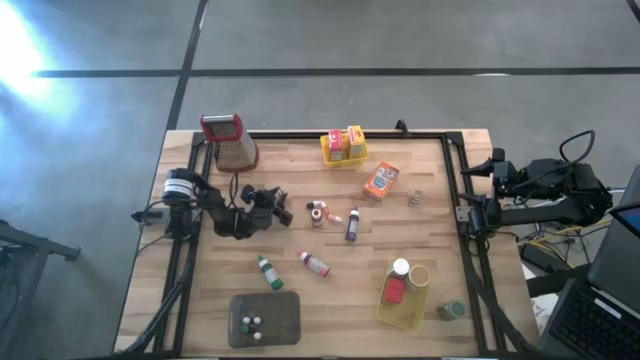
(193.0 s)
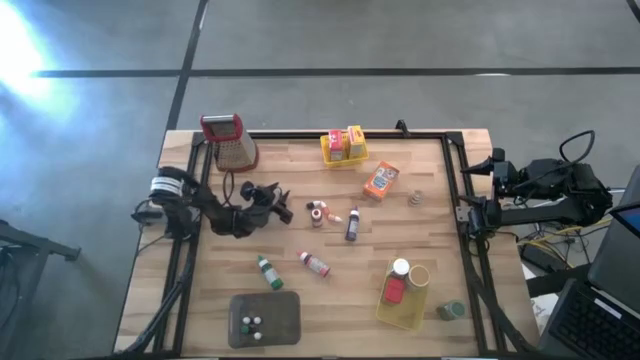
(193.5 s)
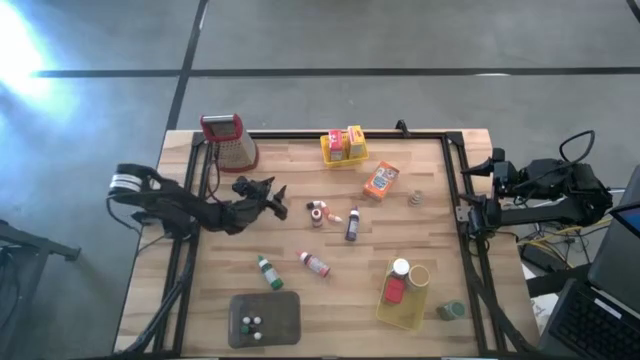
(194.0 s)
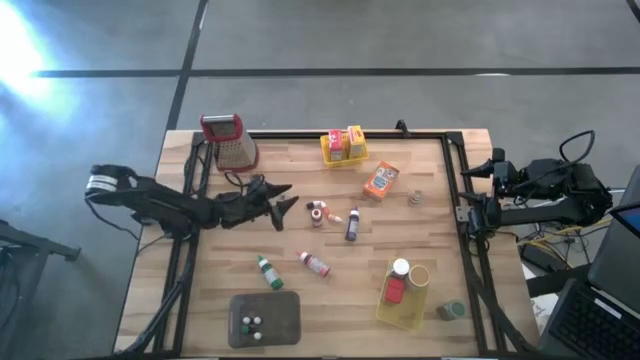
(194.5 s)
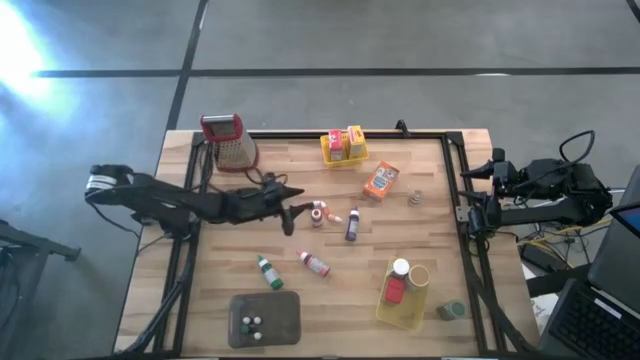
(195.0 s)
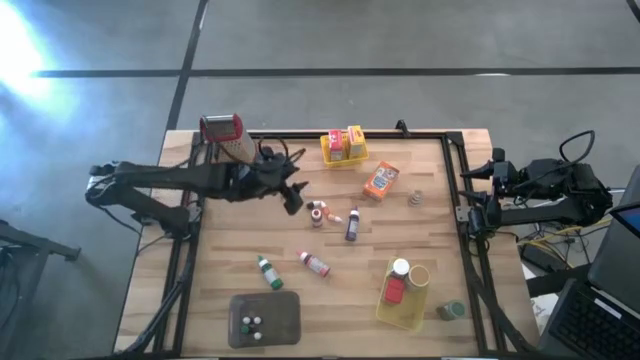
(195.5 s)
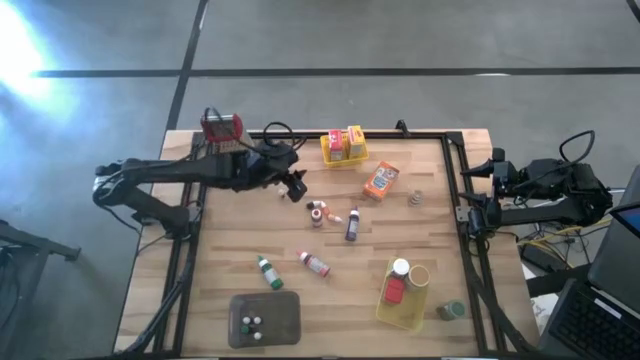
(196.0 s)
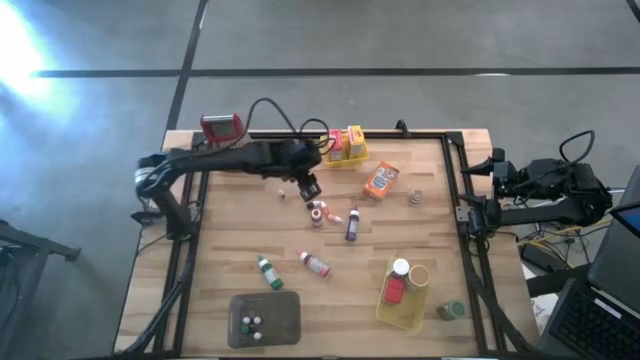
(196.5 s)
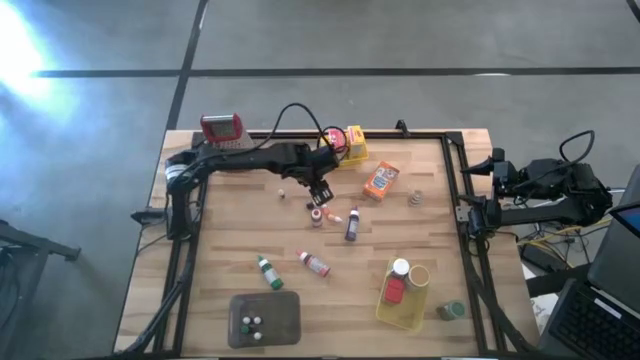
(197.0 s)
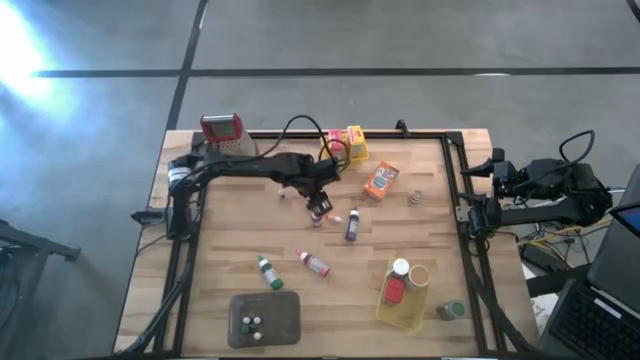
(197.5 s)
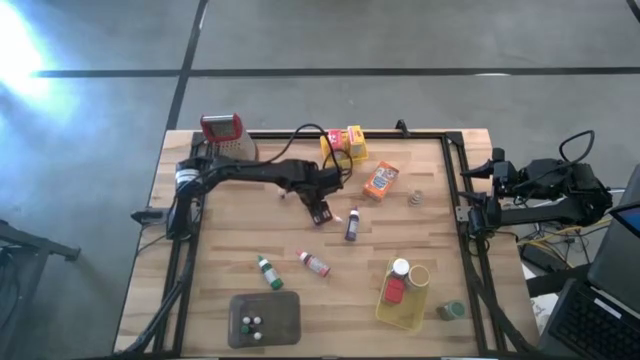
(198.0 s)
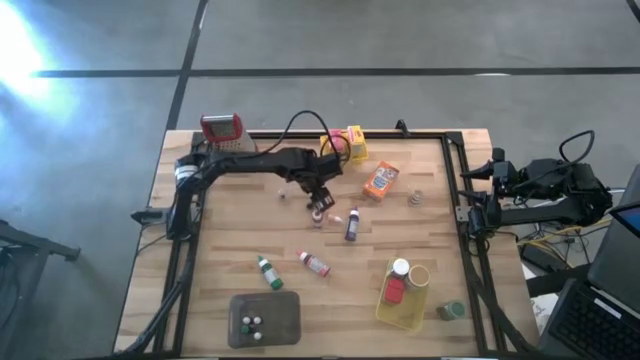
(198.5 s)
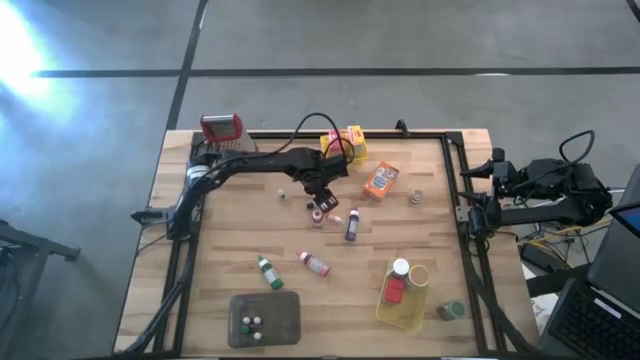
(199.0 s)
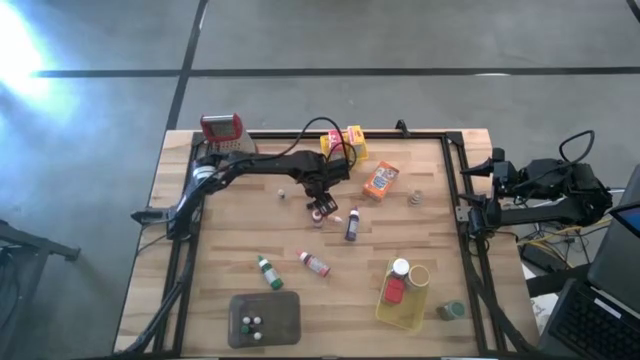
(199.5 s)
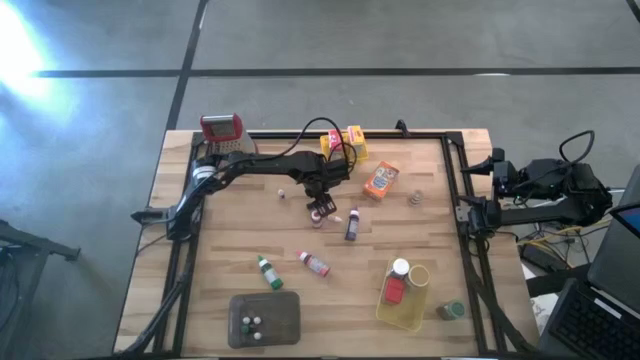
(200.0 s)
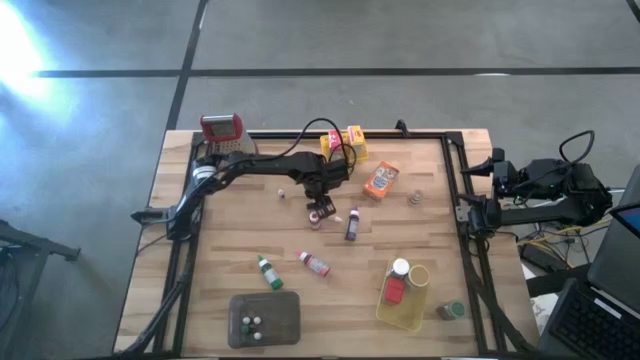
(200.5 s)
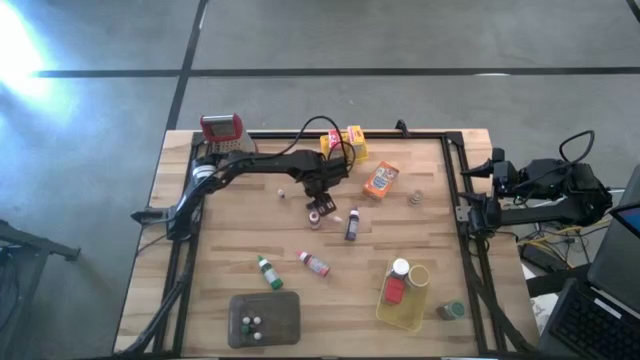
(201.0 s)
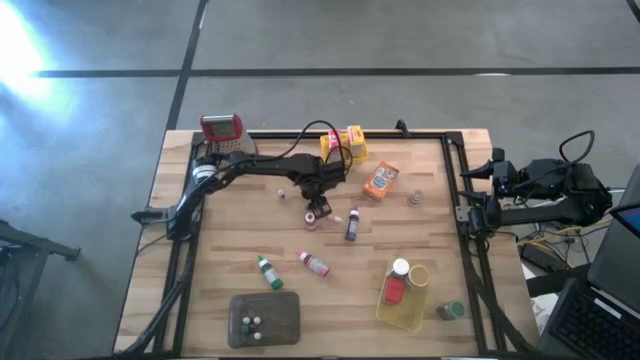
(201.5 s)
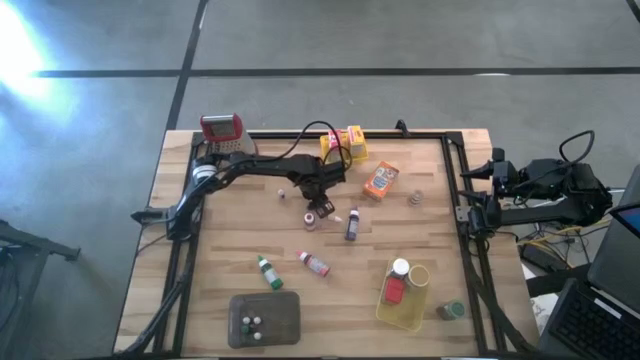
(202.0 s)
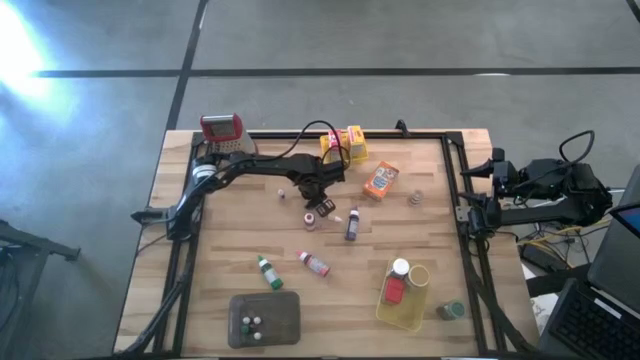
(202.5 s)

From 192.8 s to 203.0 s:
Task: Pick & Place Kitchen Items
Put the black food coloring into the black bin

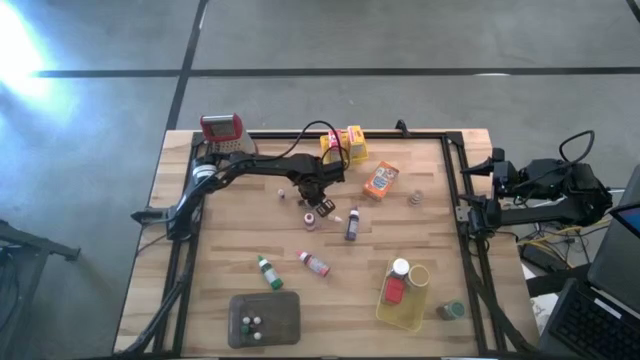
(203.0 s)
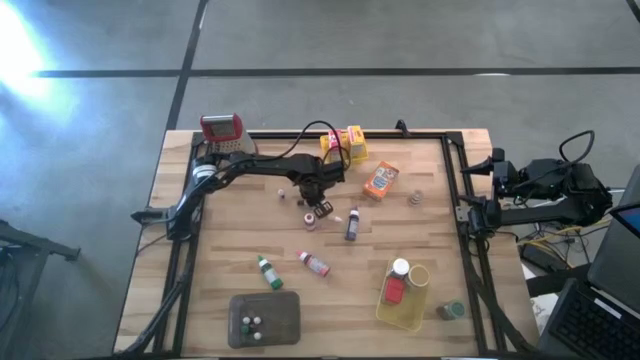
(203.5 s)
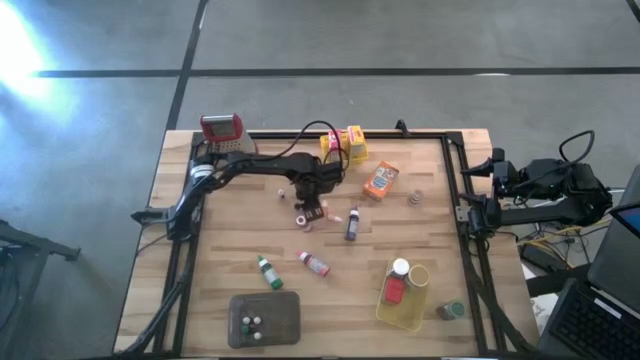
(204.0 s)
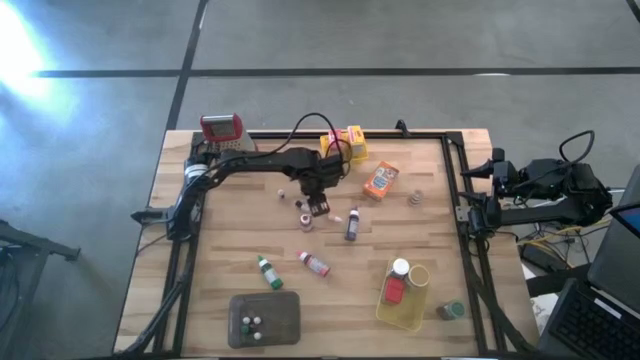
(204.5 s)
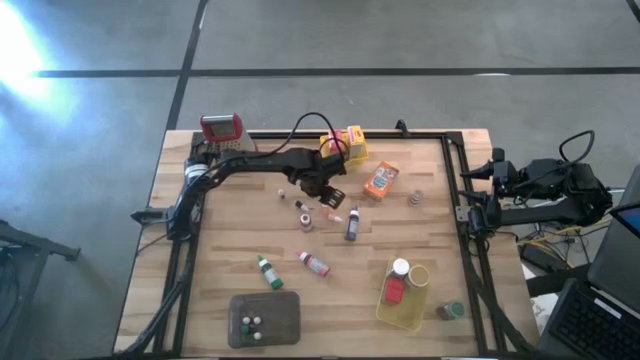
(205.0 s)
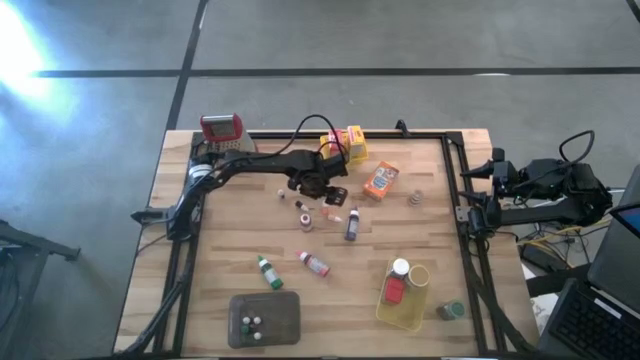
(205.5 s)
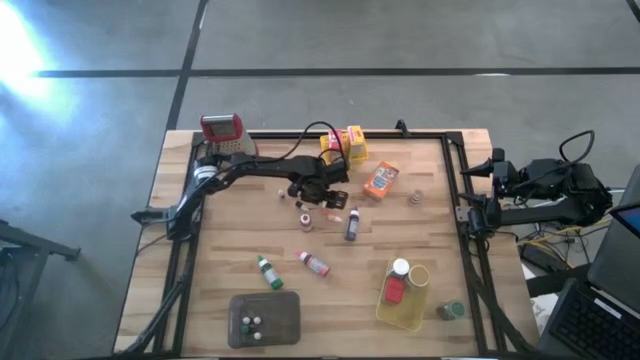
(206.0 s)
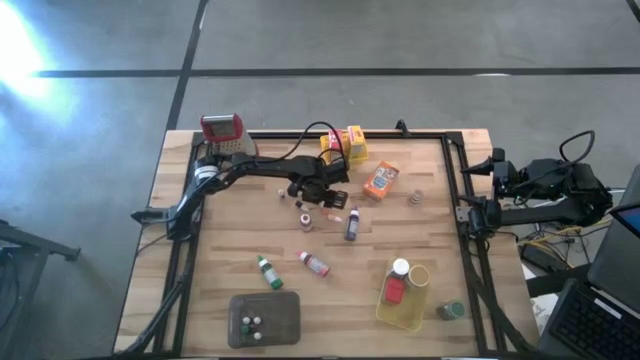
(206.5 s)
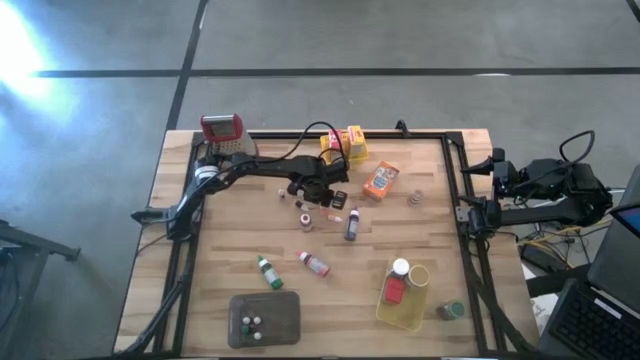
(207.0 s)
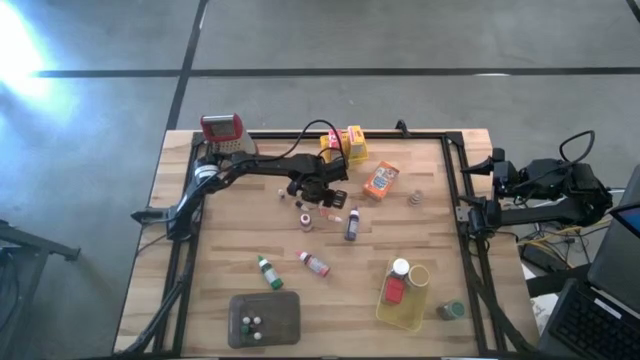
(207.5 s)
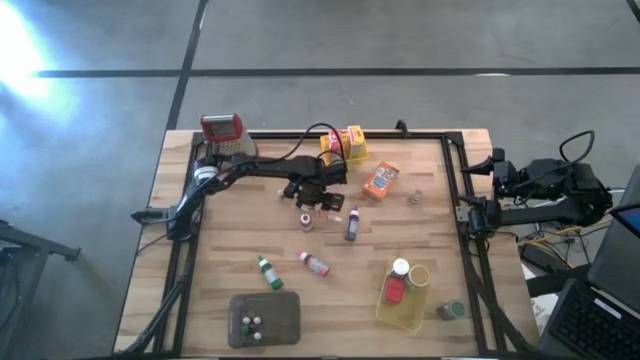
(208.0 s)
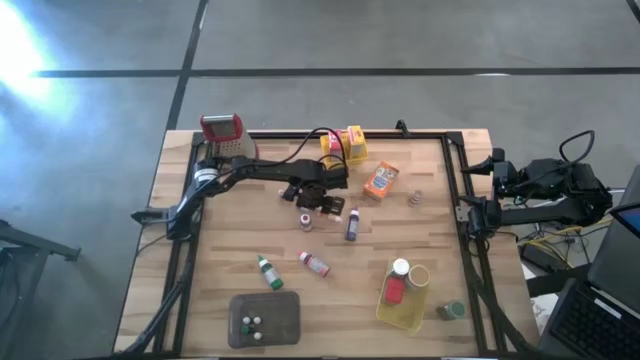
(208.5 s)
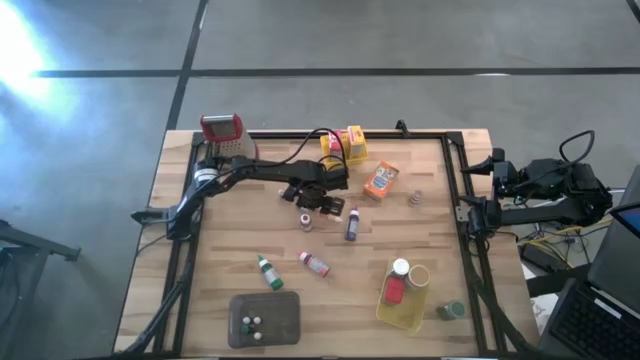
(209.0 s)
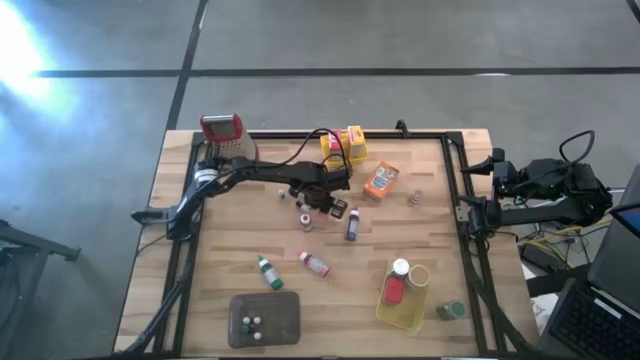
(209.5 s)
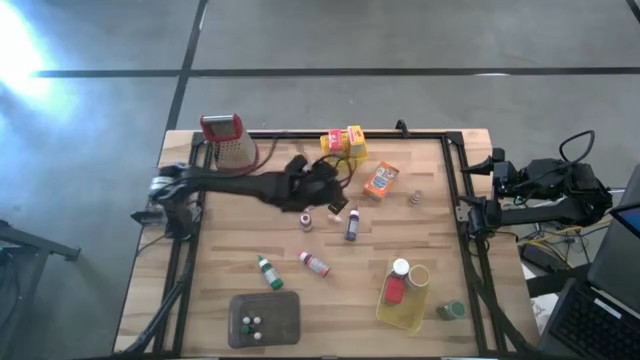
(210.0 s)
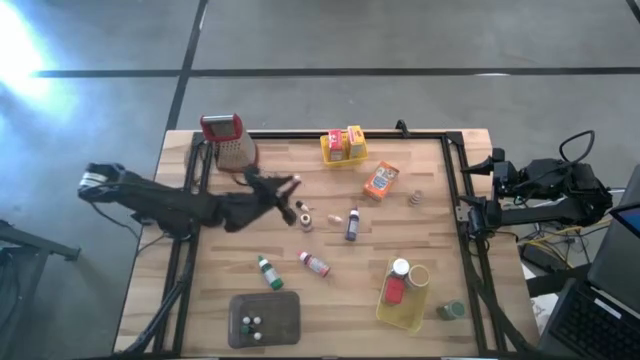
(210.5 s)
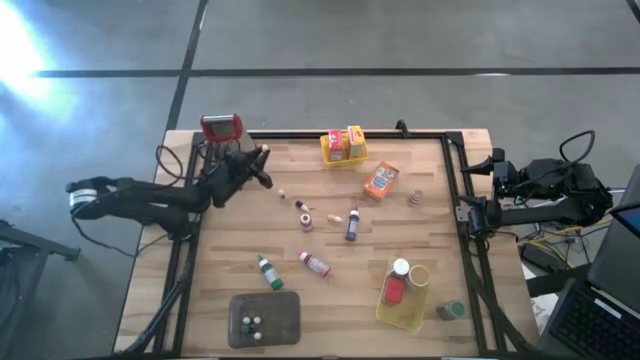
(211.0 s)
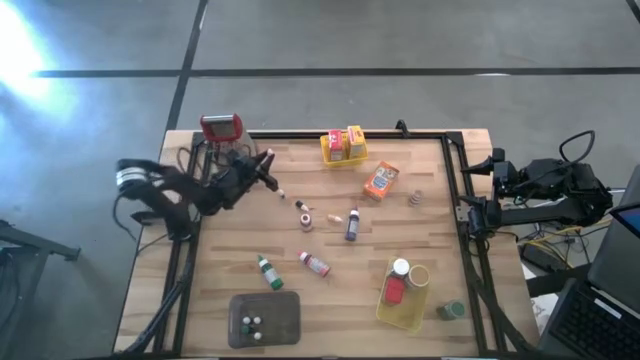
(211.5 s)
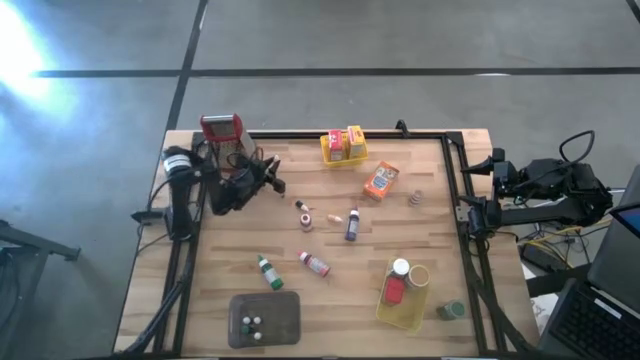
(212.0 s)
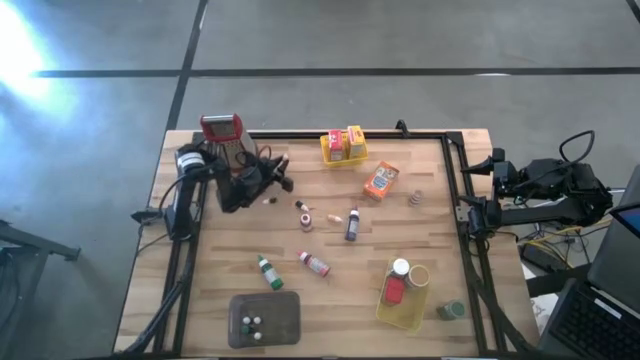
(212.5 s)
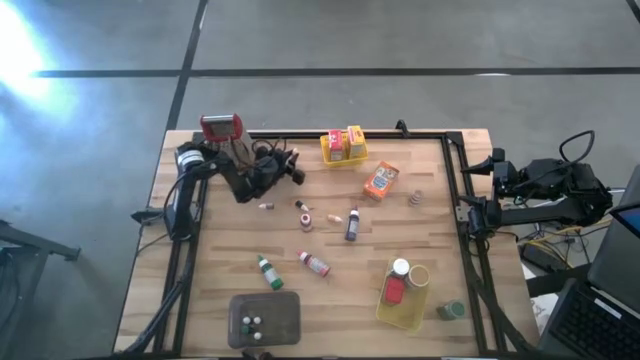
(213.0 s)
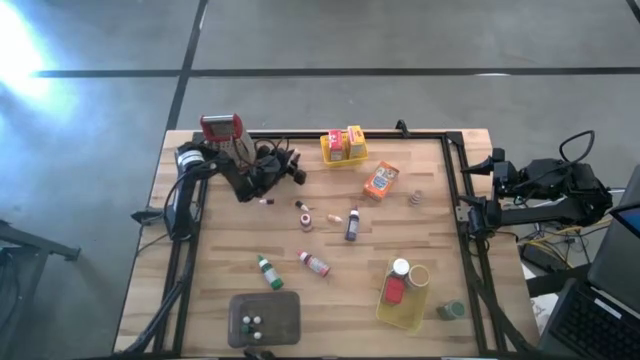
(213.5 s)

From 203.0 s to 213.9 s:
Move the top orange food coloring to the top left of the table

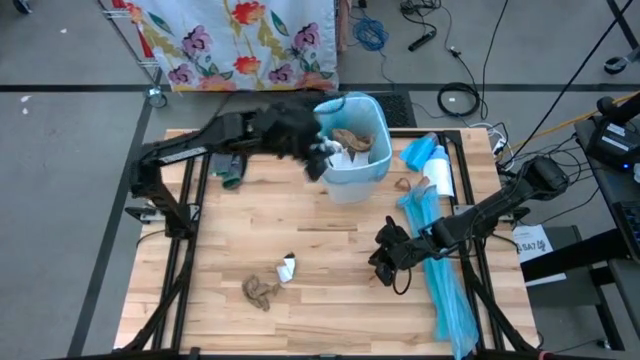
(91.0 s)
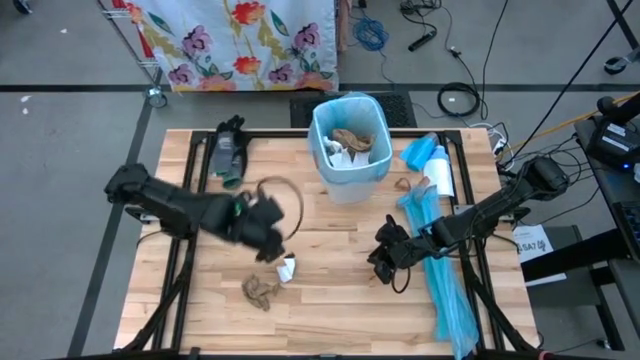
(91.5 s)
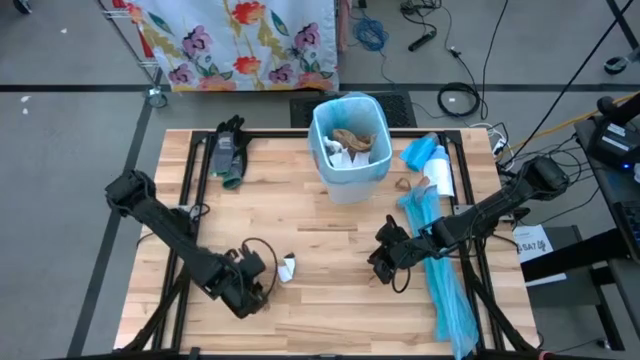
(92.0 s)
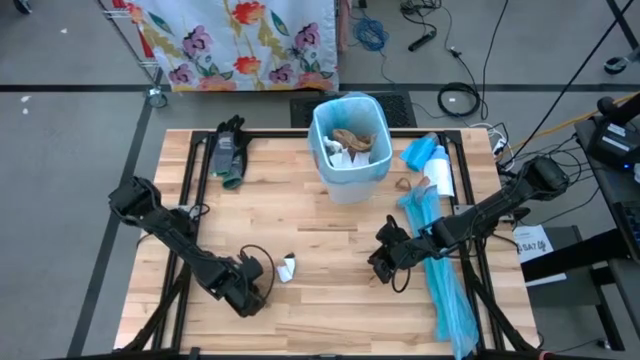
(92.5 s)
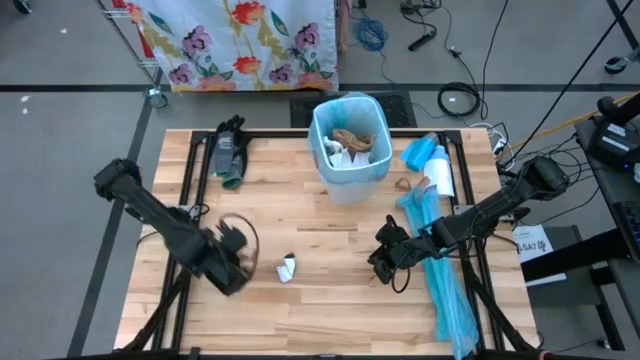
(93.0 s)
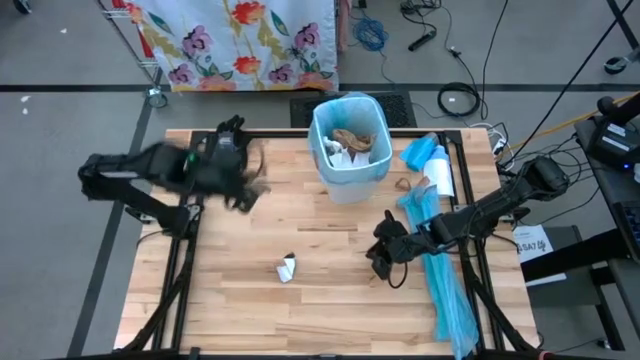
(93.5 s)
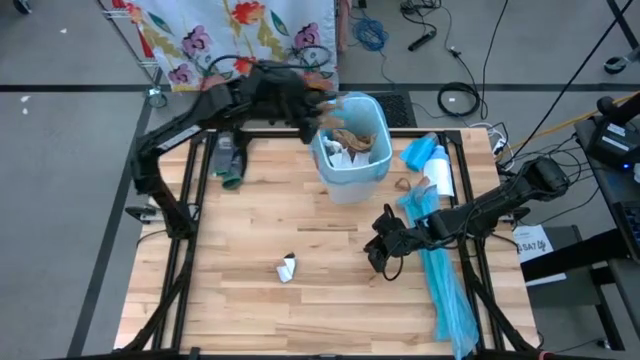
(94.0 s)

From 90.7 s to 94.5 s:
Task: place trash/remove bag and relplace
Put the brown napkin into the trash bin
